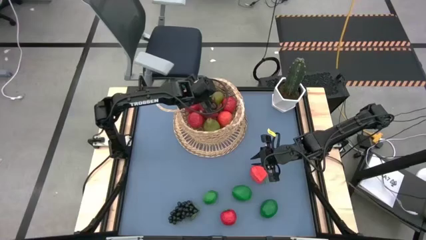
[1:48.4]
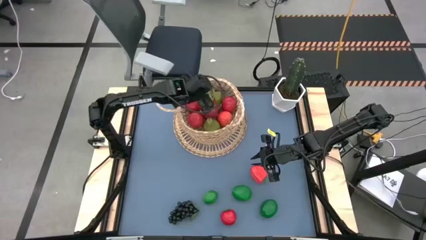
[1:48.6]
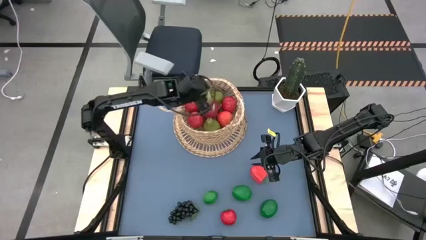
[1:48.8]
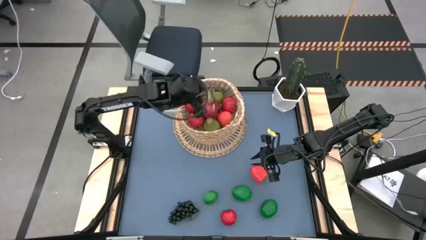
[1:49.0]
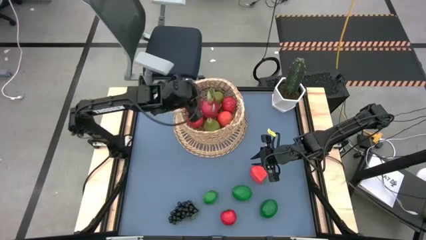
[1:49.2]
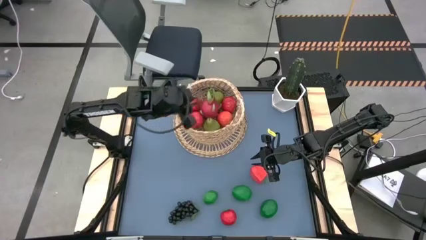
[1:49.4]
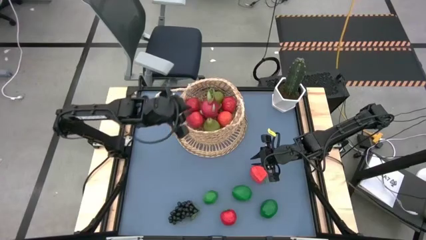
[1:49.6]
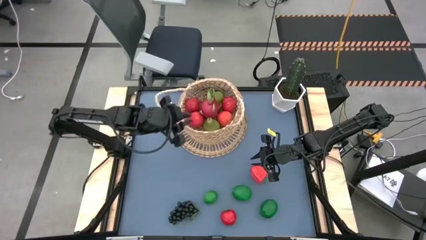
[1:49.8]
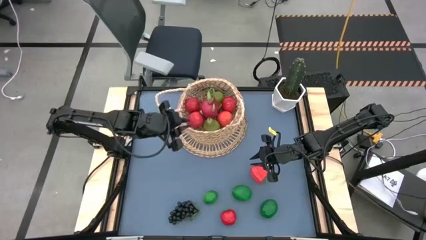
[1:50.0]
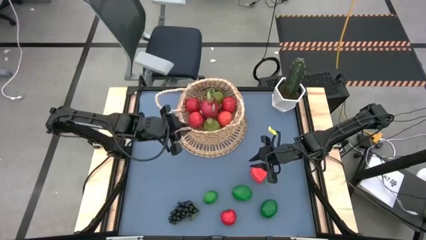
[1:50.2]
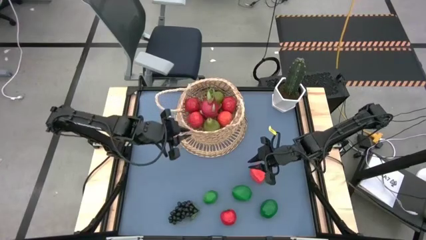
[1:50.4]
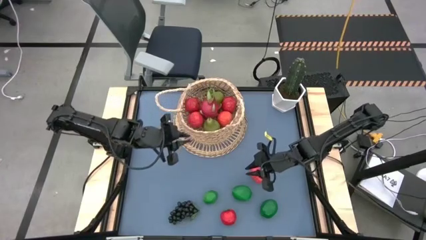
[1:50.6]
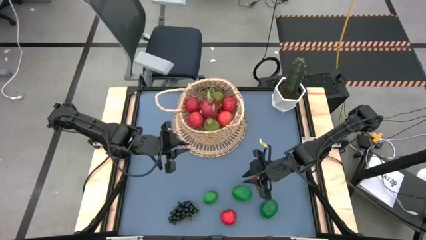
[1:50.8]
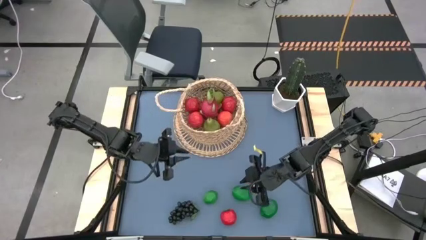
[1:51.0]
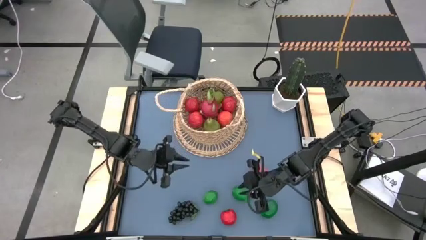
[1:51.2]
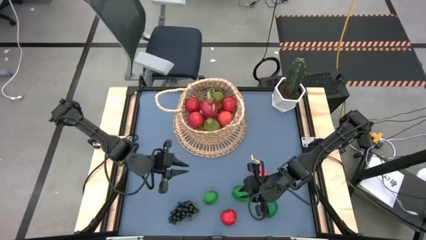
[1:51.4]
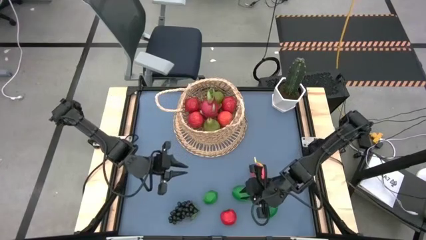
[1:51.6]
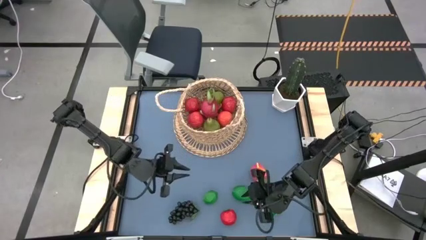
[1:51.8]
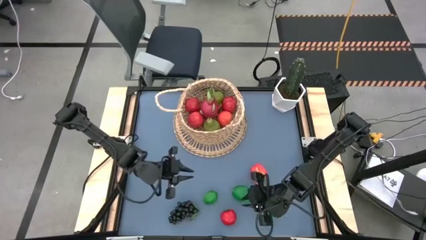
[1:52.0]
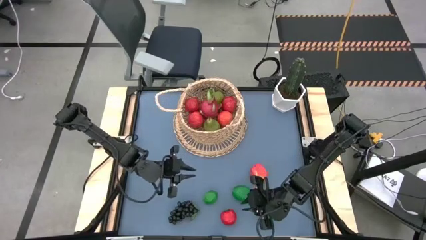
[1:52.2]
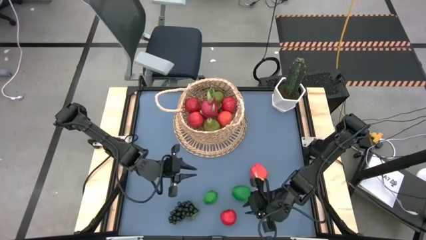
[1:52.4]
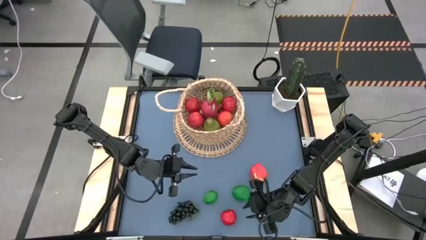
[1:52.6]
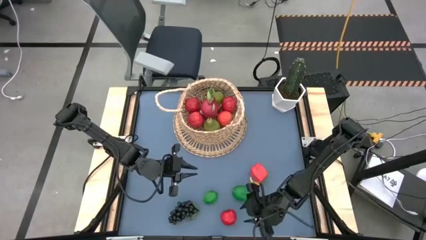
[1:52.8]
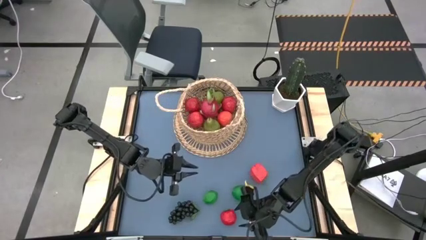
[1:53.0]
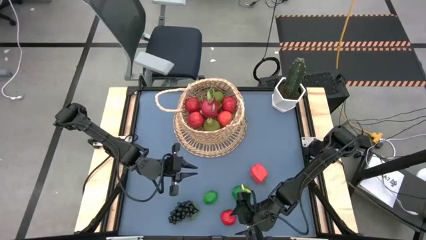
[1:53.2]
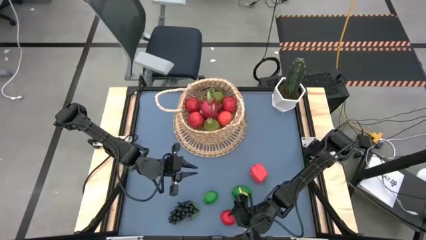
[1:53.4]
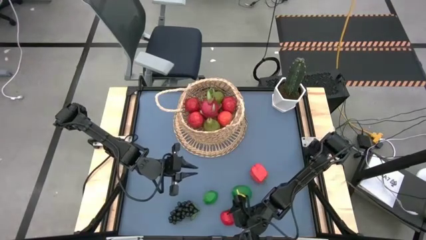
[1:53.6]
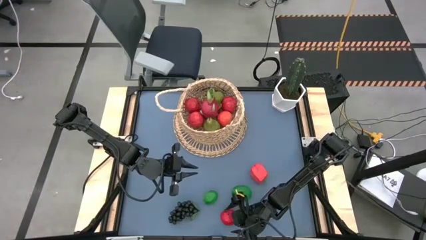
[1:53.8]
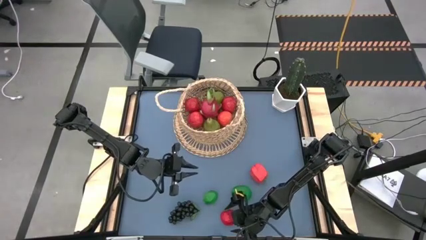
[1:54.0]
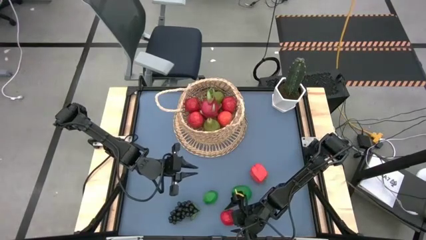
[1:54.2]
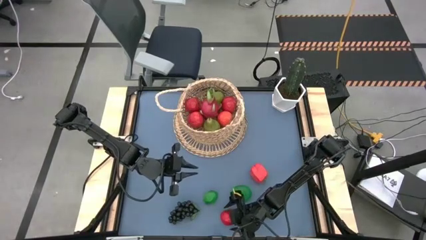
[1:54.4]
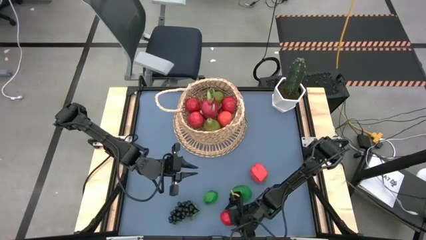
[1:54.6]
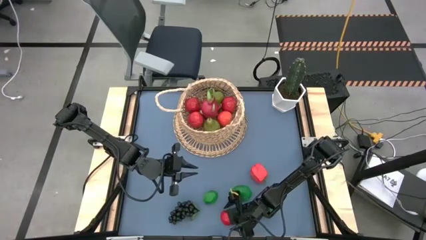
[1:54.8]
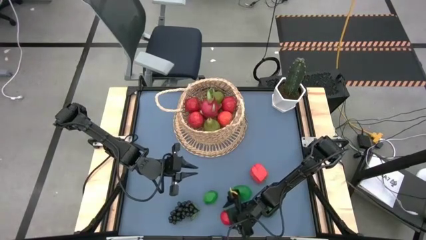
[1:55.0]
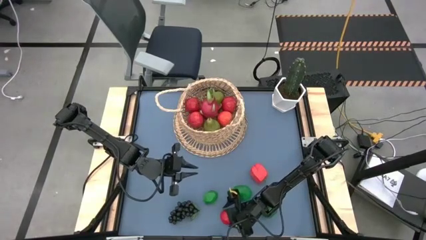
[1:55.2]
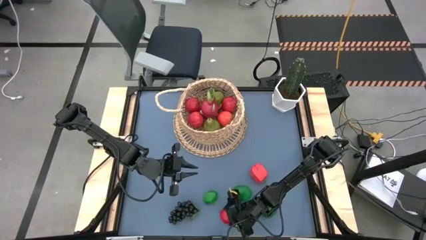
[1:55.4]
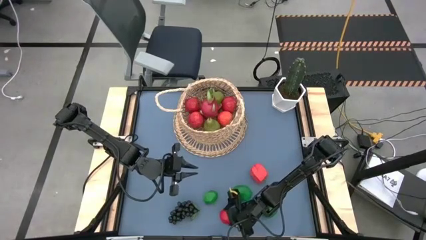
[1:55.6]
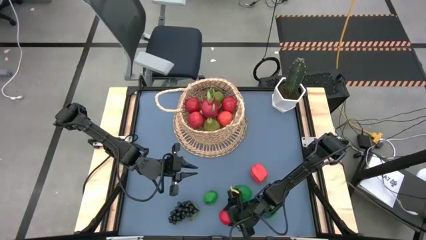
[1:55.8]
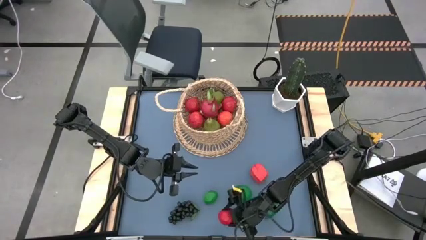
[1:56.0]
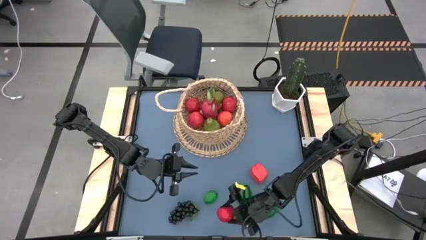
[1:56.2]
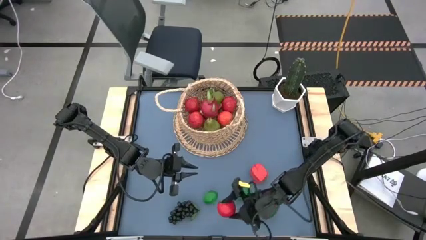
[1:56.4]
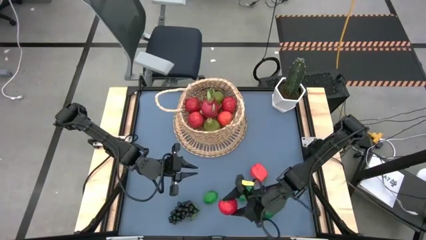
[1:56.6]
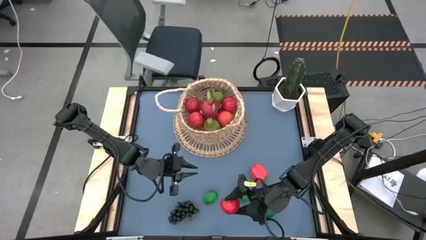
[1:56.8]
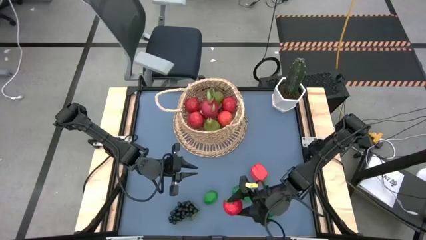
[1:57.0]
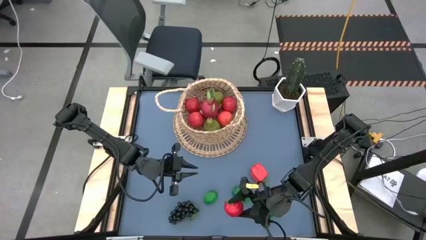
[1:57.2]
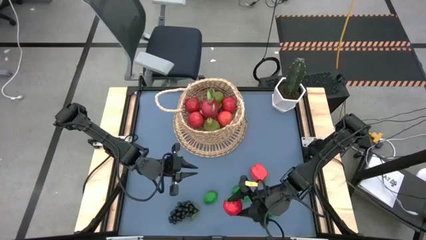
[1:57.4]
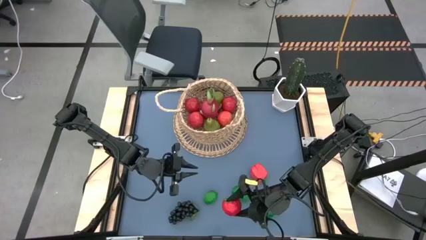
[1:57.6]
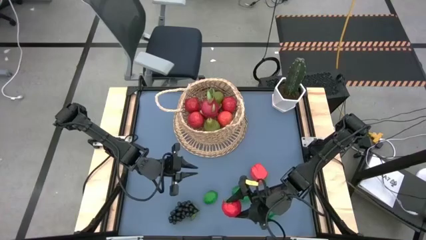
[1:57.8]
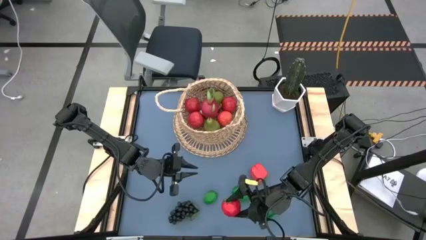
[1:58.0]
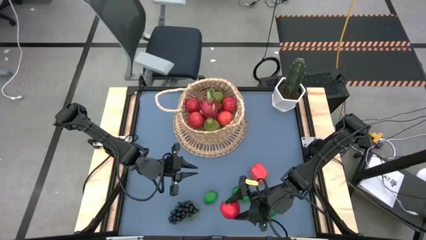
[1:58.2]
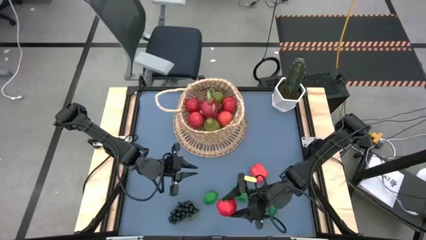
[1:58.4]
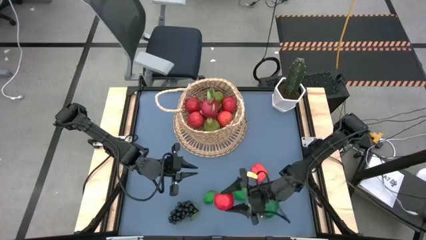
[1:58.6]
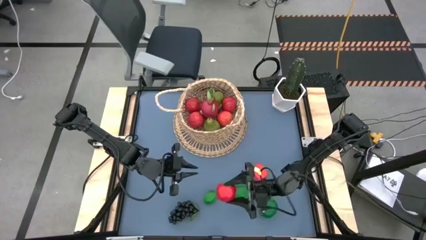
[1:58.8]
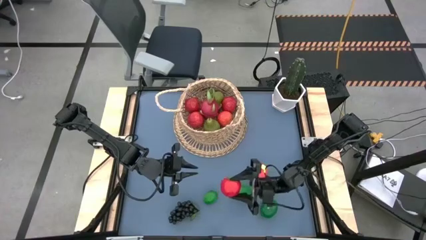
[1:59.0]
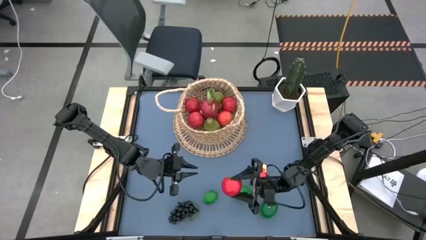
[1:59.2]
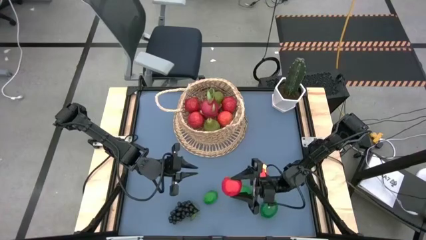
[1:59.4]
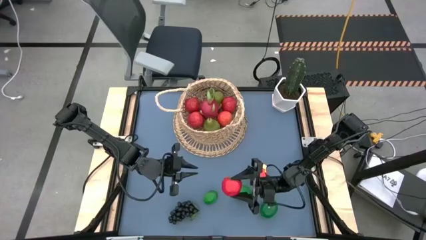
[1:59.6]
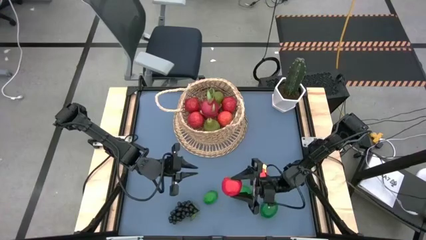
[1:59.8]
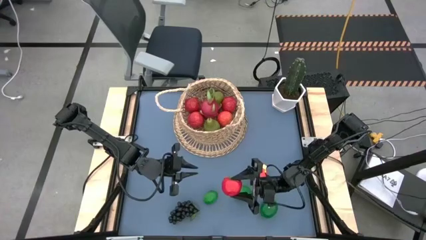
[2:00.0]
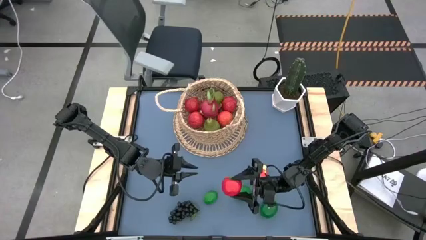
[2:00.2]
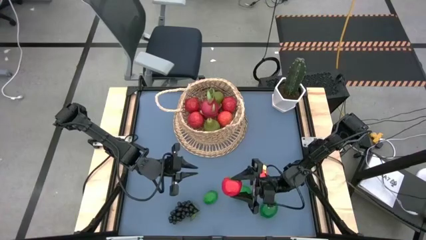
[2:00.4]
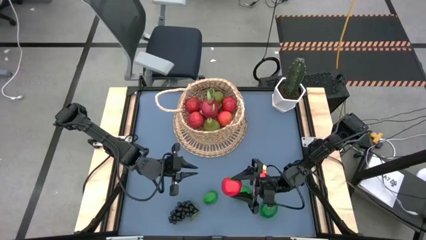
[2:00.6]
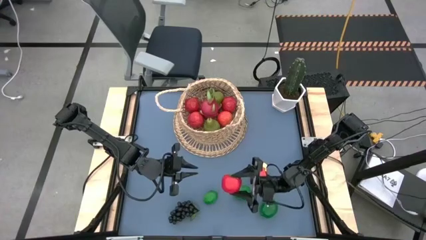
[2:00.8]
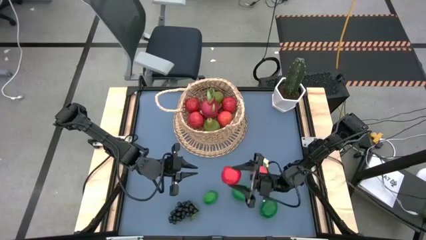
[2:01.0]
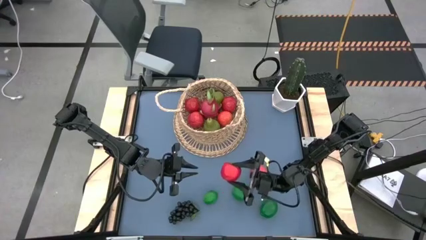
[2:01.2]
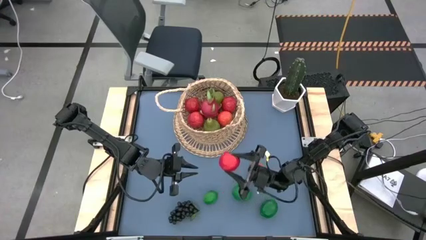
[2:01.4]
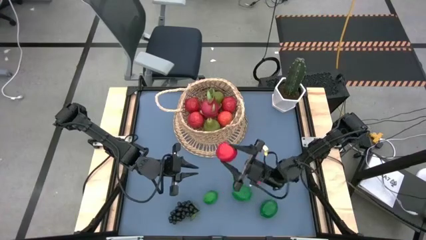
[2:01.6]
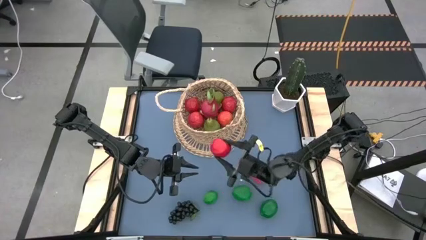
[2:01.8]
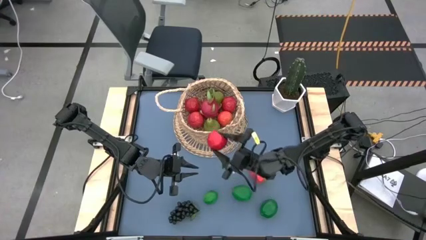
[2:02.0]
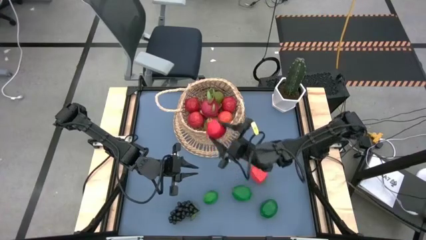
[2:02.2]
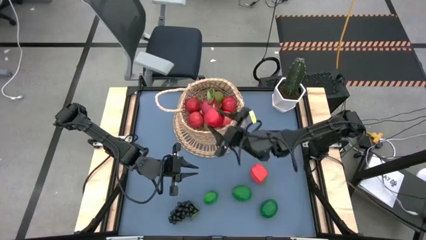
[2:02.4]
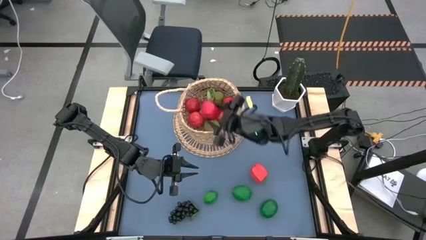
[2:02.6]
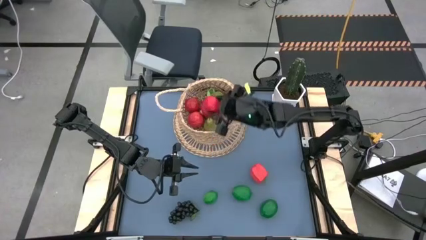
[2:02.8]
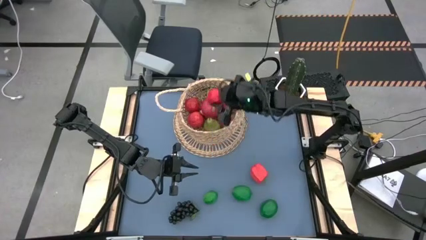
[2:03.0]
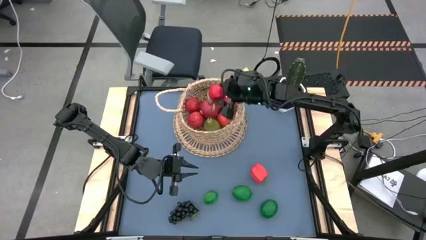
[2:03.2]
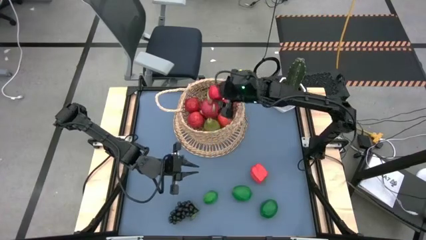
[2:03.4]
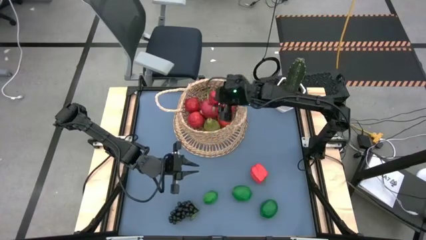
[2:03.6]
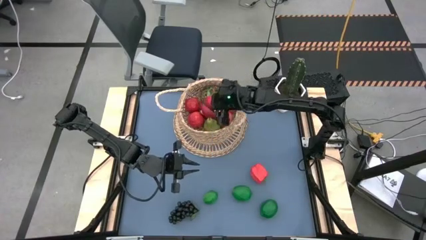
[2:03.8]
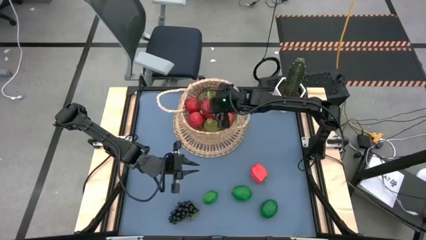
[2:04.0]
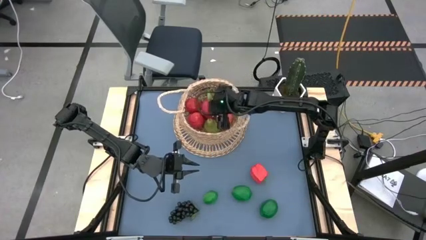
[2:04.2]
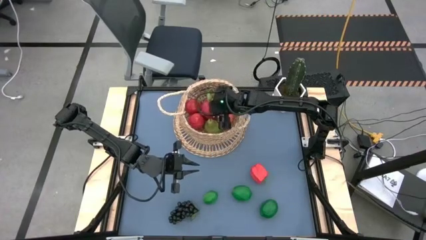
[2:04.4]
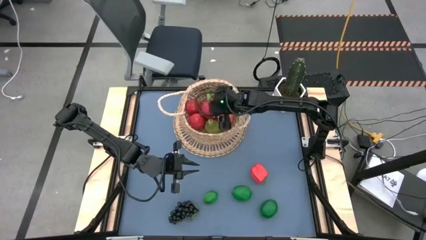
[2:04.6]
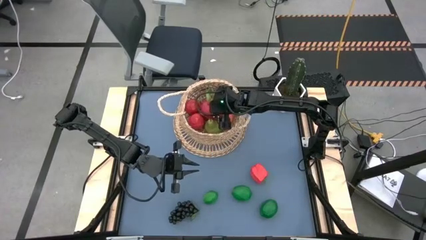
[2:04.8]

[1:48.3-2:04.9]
Task: Build produce basket
Put the tomato into the basket
